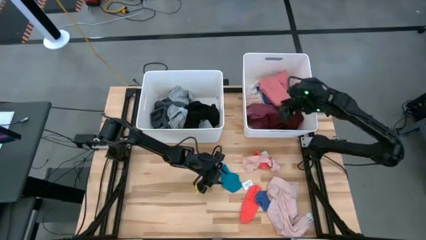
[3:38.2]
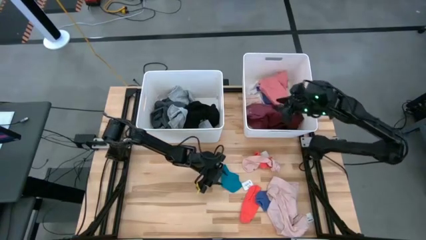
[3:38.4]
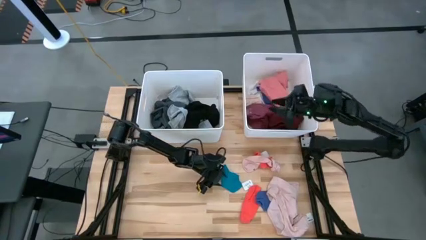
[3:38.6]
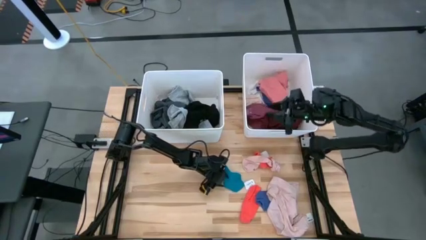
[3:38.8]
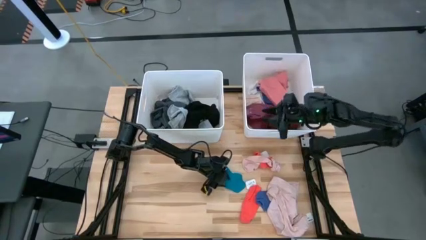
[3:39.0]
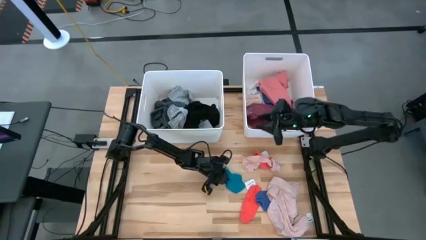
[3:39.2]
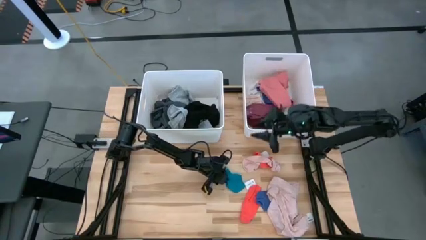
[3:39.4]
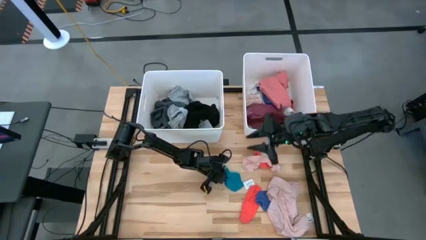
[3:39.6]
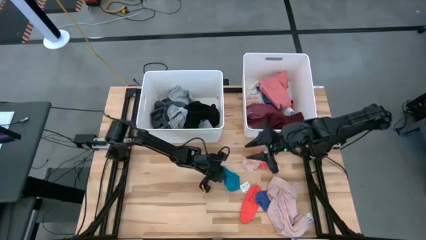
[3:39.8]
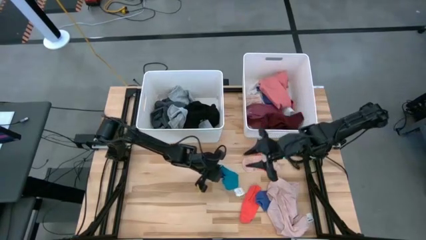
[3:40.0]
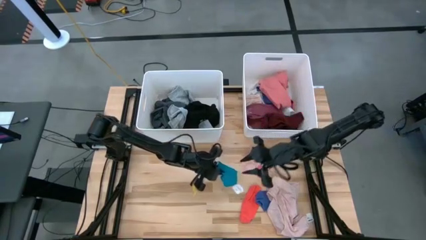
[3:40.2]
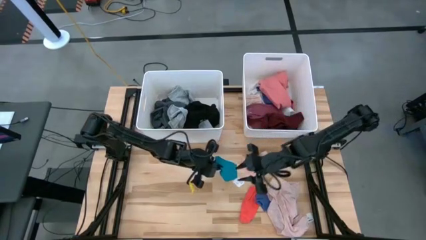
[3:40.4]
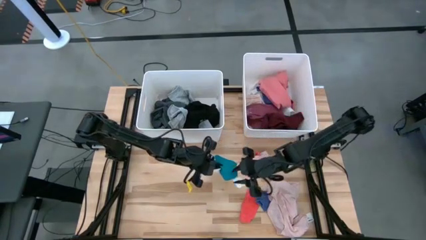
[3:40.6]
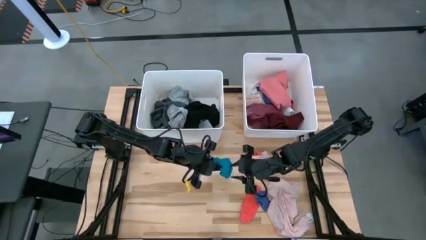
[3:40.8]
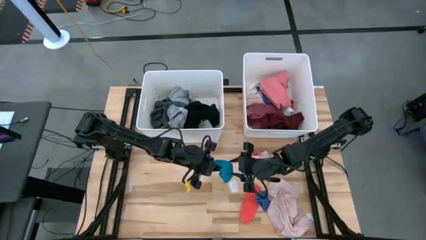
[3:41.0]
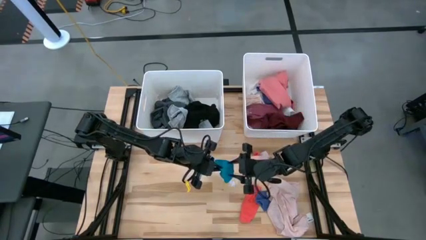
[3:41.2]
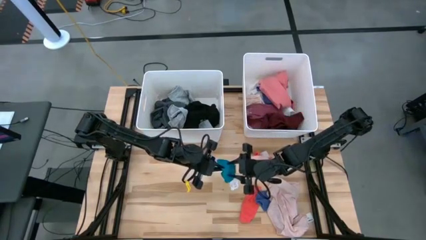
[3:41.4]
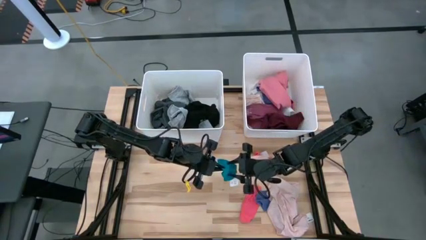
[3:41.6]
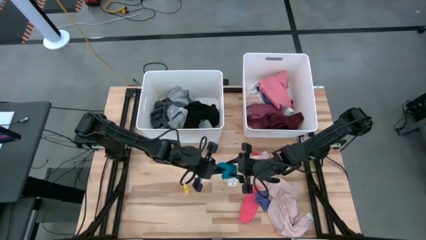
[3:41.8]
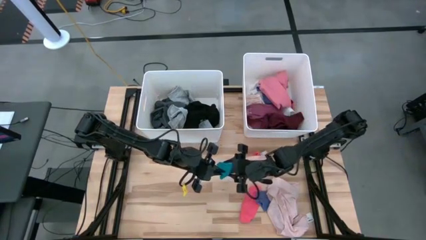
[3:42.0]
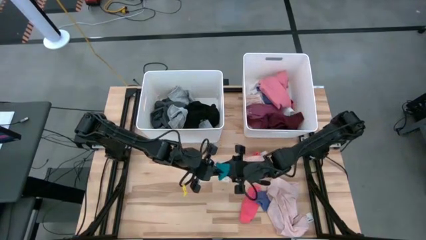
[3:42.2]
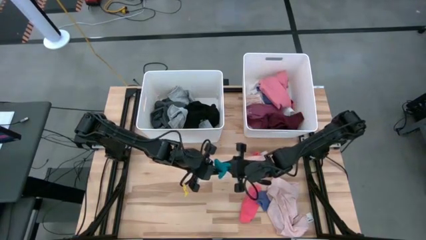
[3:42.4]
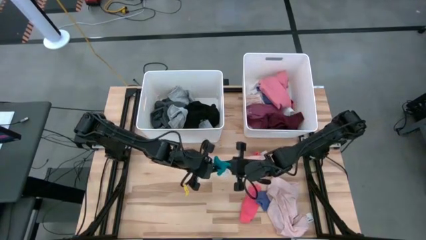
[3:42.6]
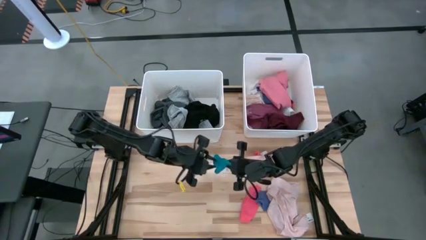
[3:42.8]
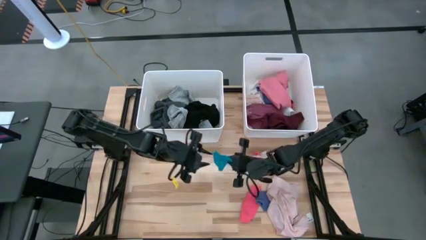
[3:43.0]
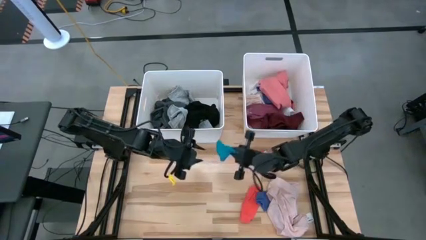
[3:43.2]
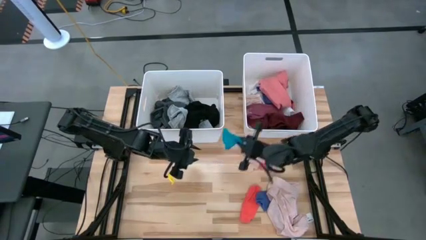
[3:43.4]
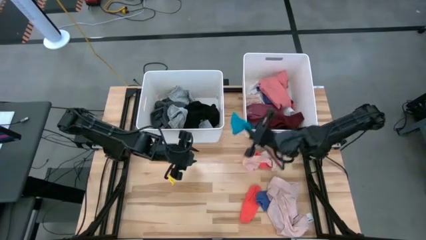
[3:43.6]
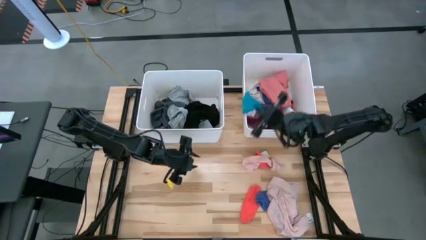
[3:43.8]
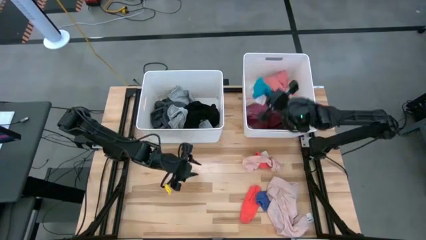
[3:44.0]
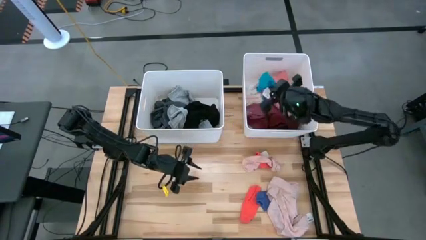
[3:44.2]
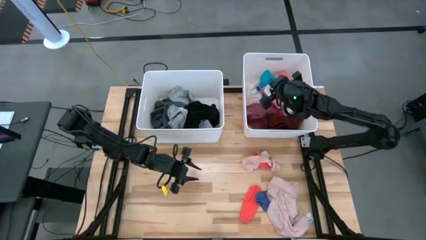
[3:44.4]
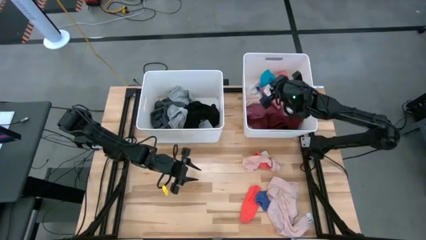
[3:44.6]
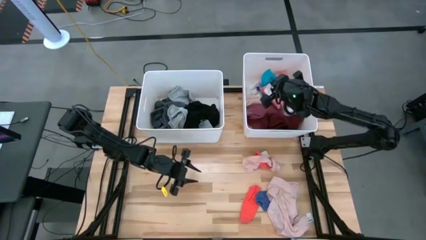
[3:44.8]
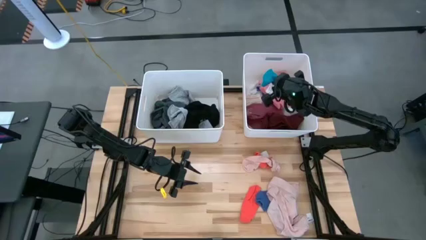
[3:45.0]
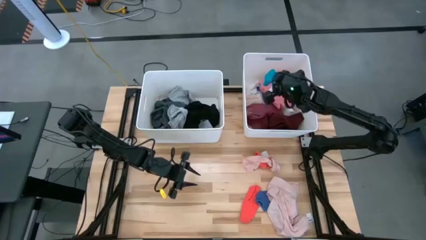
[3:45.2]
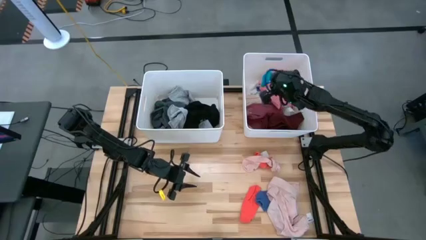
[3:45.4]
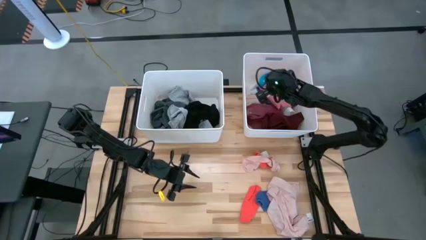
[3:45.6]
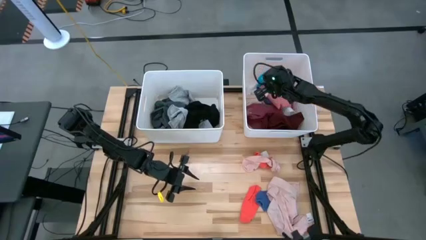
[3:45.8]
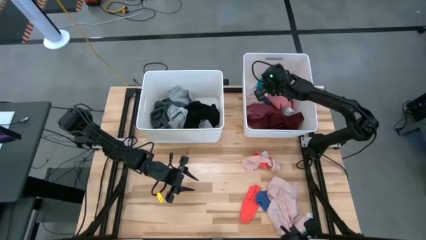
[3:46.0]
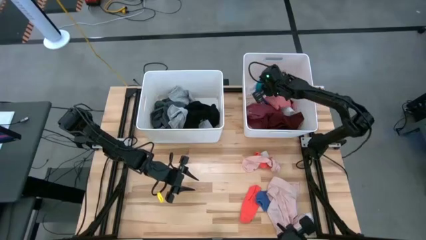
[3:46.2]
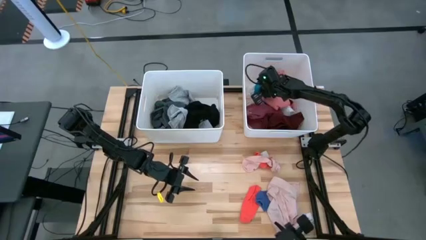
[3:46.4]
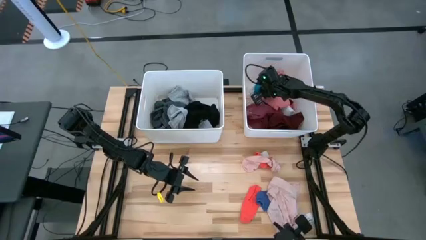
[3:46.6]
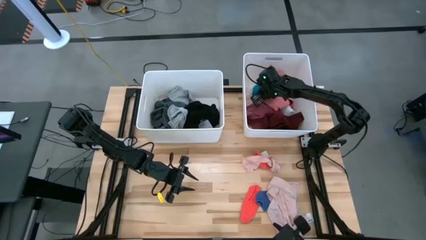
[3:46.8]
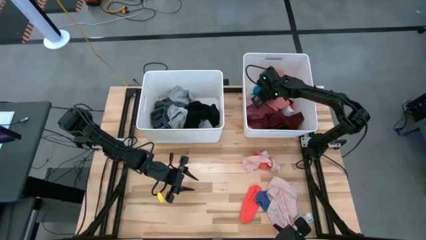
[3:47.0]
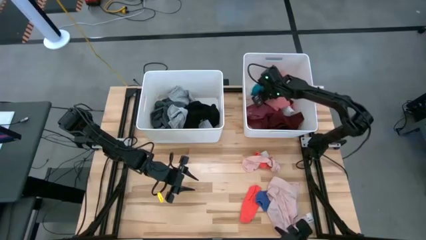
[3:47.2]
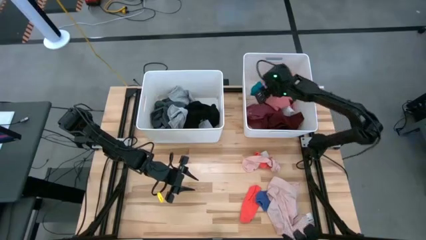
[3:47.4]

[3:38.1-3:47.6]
Task: Sort clothes
Put the blue sock into the right white laundry organizer
